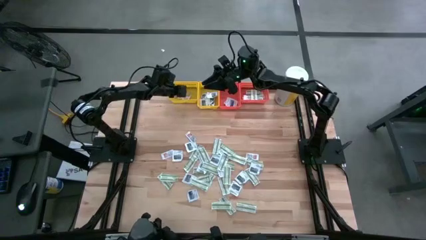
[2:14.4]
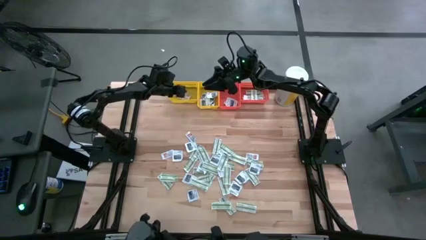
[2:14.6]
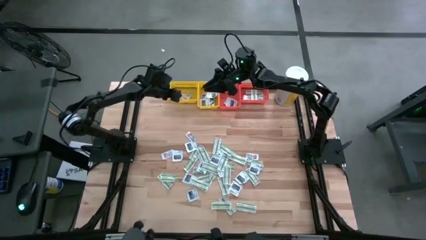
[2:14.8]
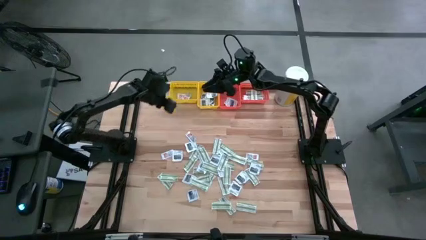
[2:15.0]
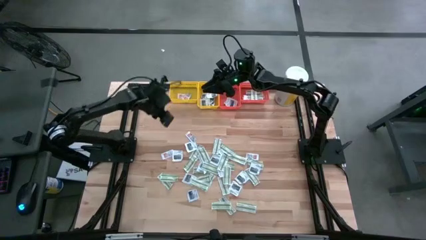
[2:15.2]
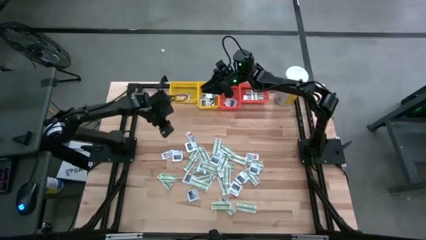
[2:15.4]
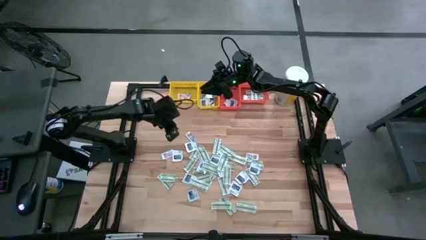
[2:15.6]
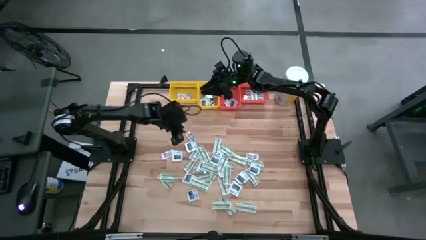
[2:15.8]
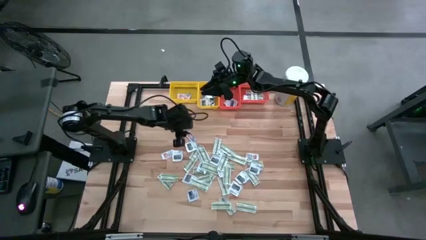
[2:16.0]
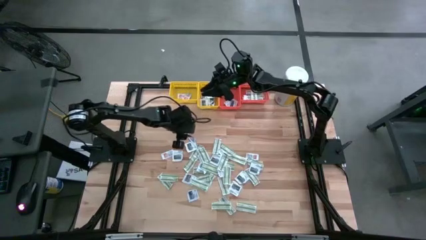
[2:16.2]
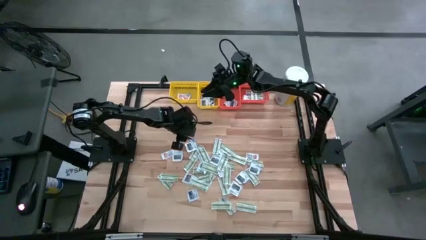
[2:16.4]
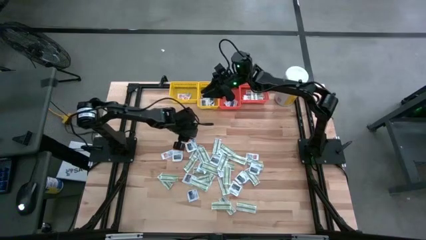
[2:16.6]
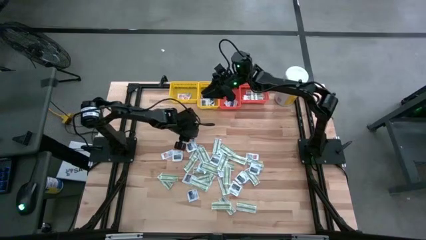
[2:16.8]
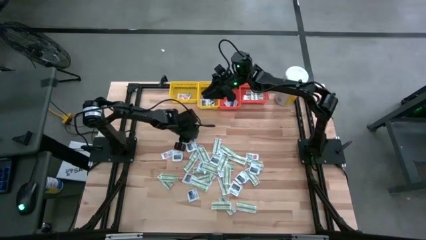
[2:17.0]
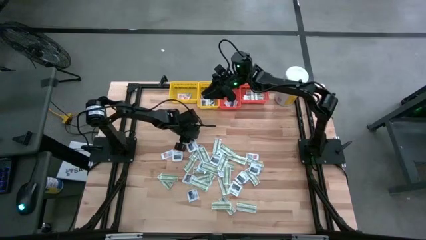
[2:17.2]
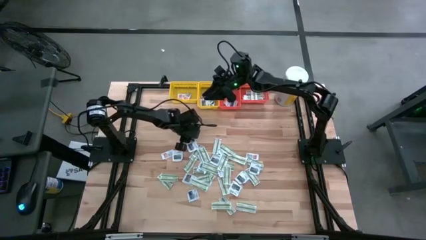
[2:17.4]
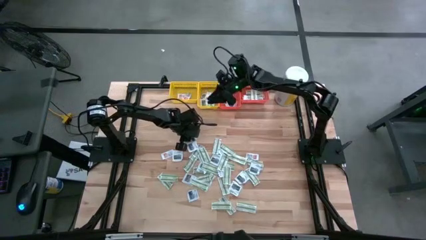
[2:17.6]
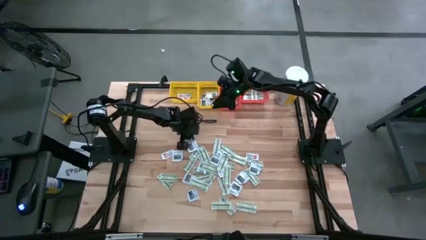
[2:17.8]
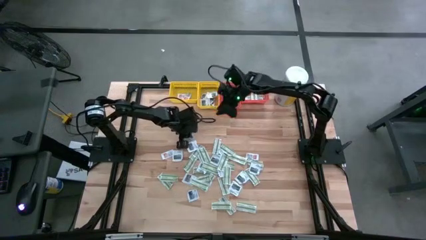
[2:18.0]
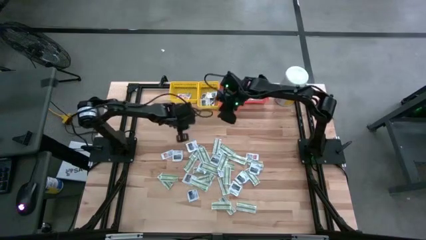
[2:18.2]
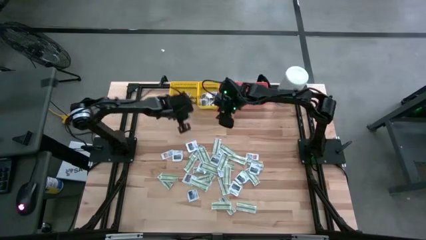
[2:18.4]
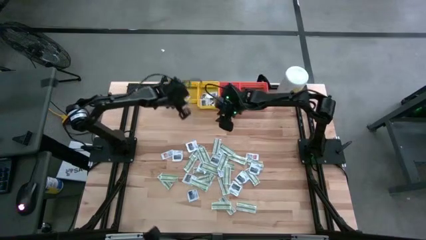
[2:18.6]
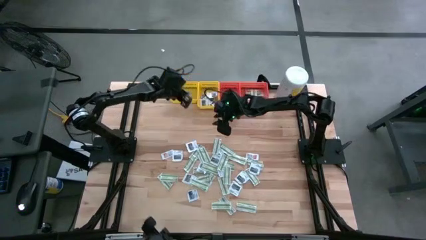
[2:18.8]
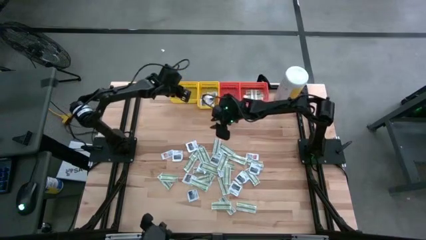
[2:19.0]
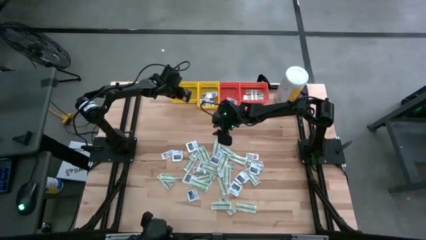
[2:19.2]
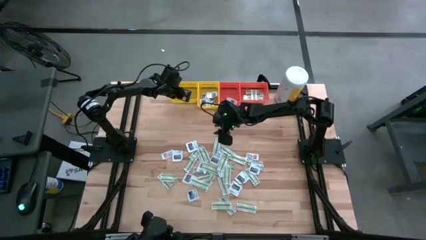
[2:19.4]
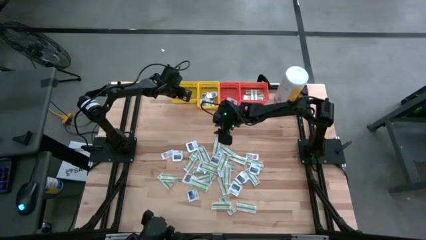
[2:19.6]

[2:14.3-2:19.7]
Task: Pick & Place First Aid Supplies
Put the orange packet into the left yellow bin

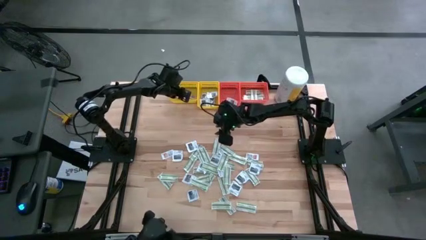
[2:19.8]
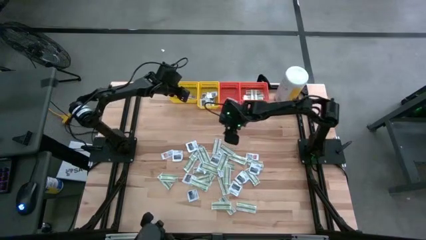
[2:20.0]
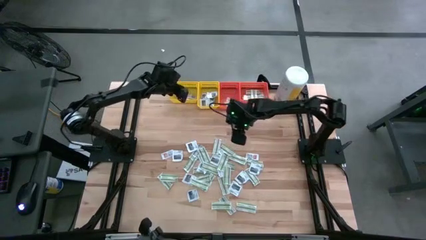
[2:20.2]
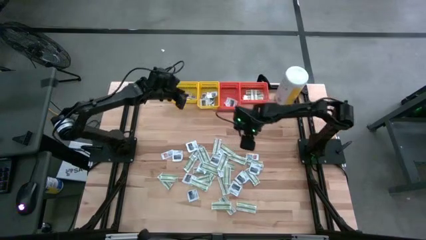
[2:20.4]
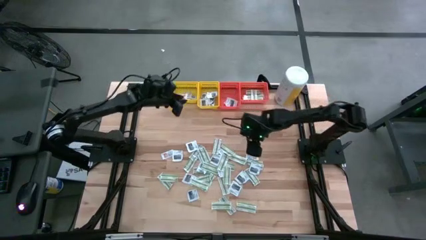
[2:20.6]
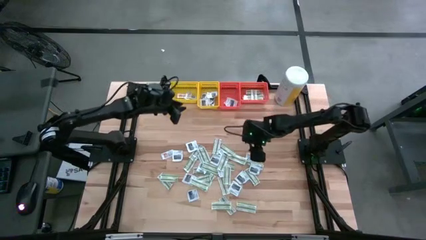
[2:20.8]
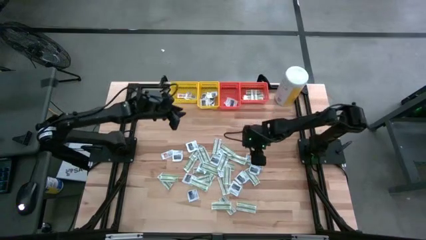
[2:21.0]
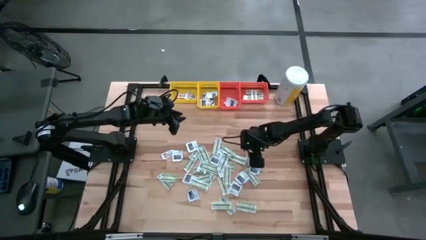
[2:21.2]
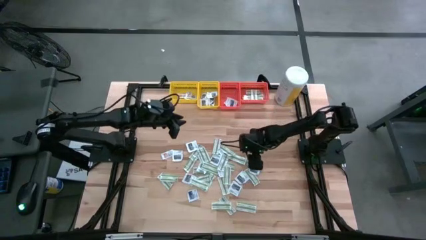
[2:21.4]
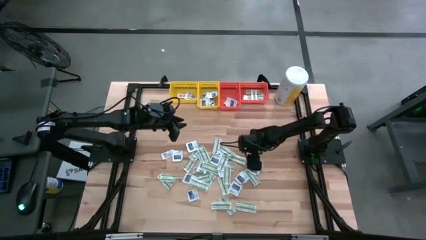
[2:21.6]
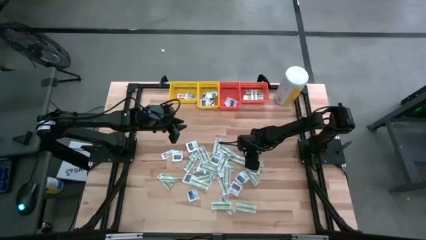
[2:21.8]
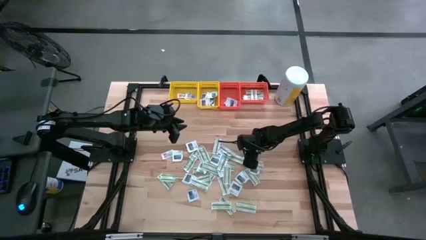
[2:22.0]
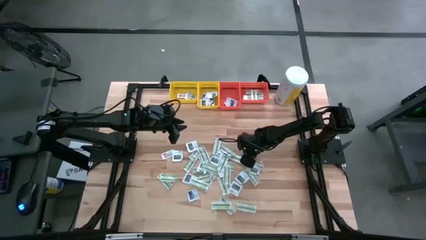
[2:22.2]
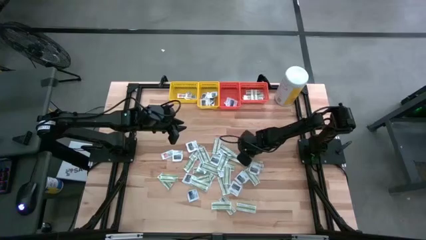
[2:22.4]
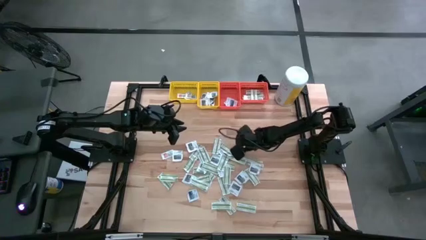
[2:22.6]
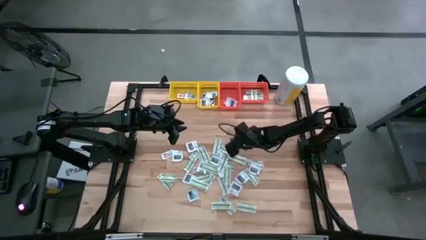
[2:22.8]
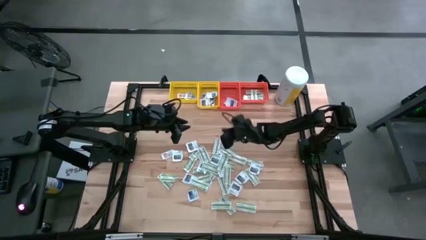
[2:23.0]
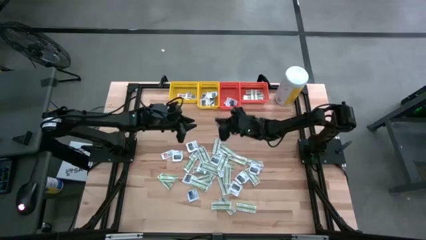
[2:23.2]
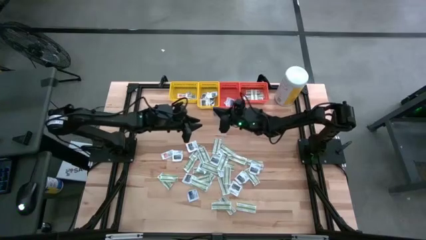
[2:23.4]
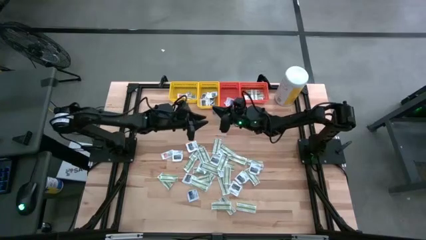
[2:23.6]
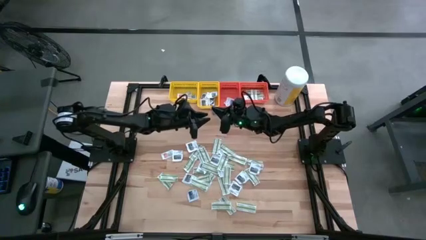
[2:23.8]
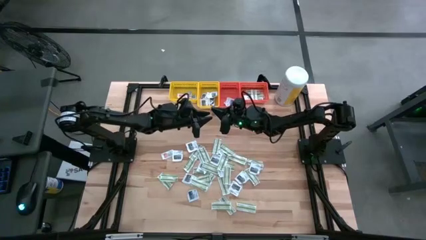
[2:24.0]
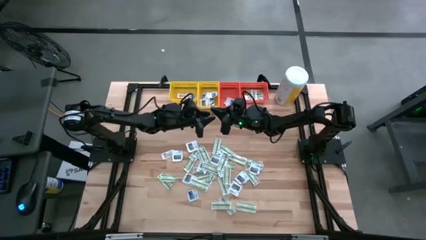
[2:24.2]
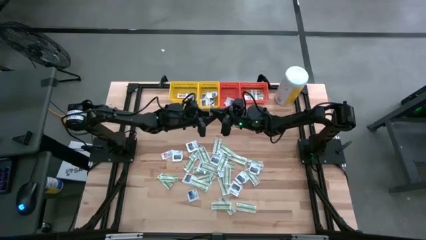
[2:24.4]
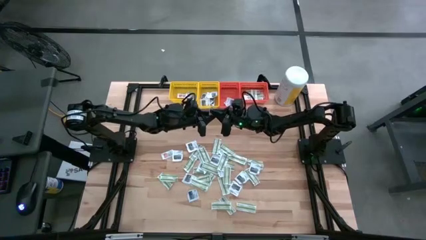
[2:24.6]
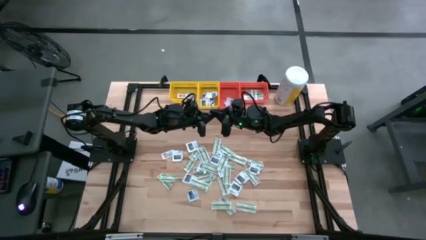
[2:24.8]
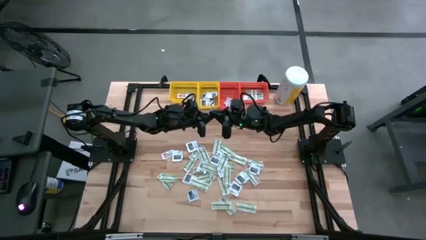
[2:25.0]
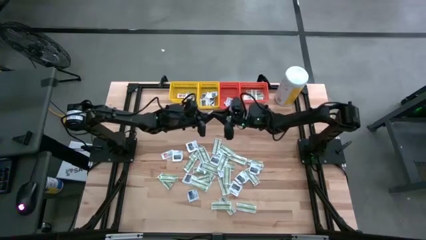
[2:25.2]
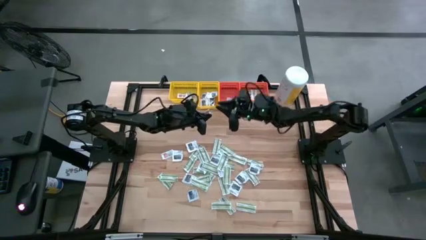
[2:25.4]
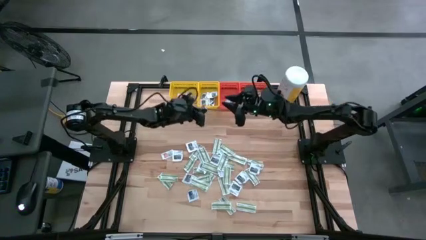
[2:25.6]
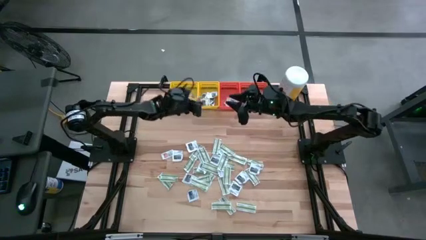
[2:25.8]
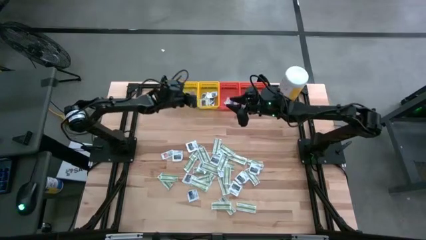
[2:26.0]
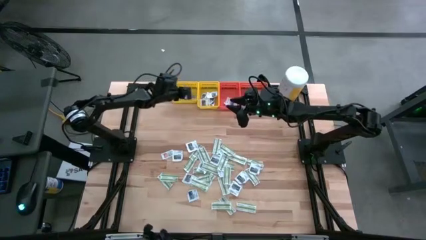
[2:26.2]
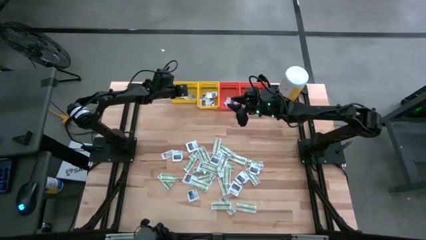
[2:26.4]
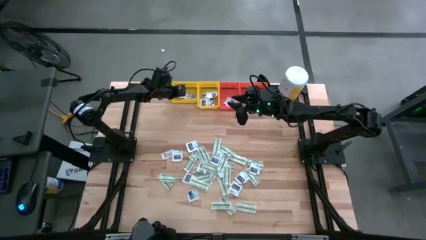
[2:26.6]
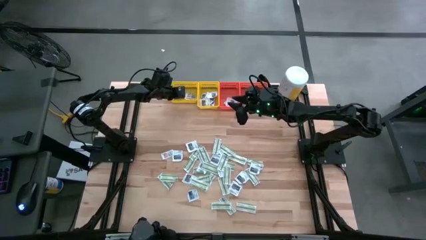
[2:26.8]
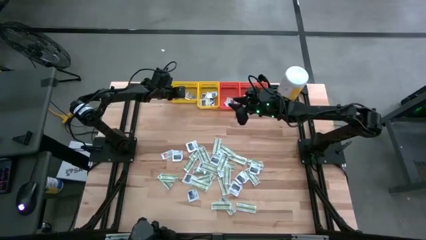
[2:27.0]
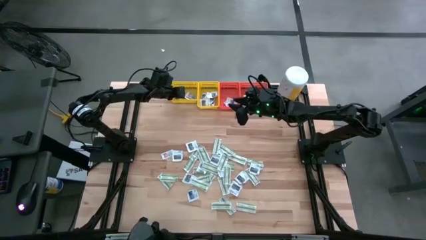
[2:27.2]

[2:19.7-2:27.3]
Put the orange packet into the left yellow bin

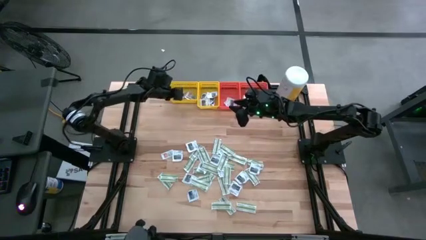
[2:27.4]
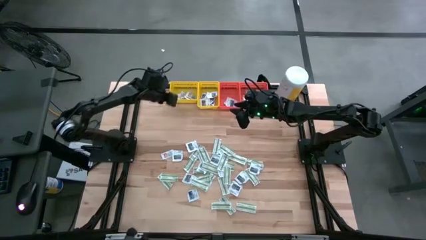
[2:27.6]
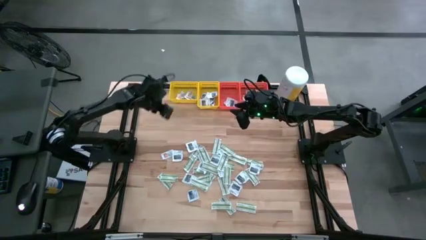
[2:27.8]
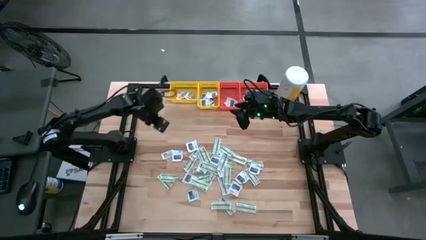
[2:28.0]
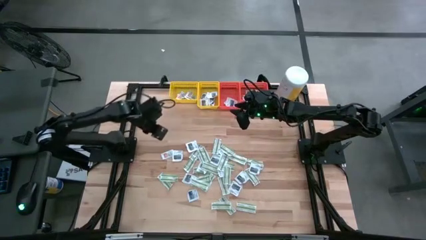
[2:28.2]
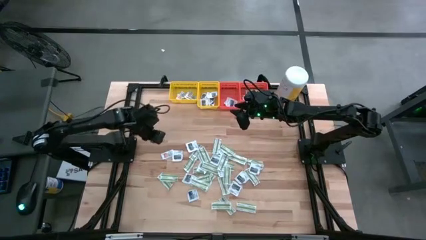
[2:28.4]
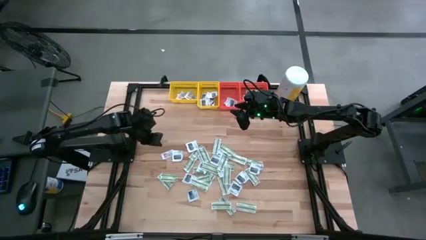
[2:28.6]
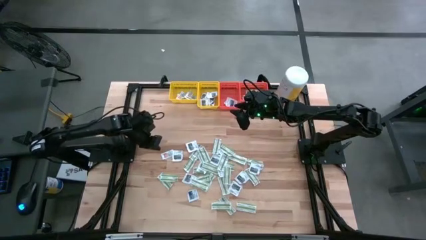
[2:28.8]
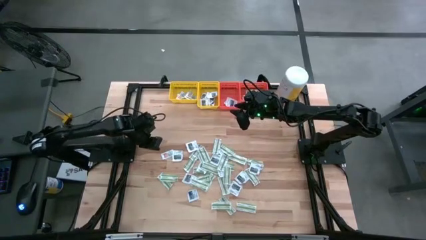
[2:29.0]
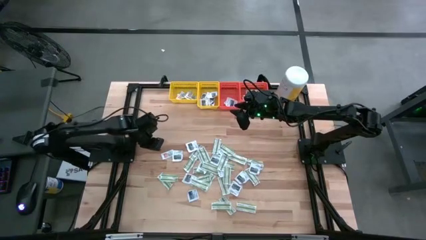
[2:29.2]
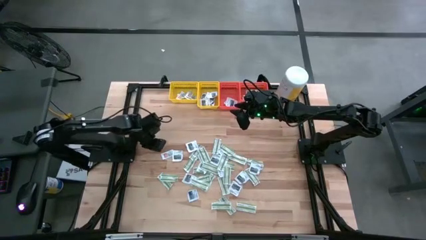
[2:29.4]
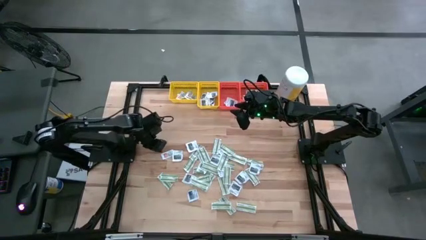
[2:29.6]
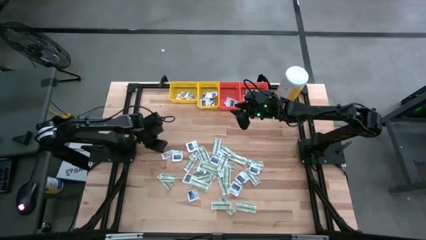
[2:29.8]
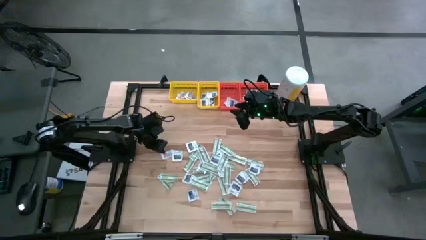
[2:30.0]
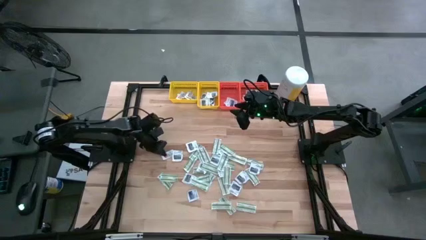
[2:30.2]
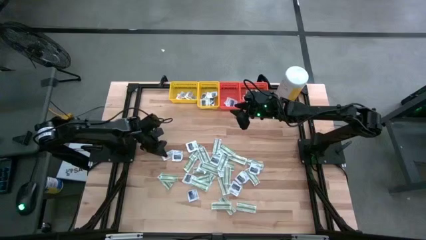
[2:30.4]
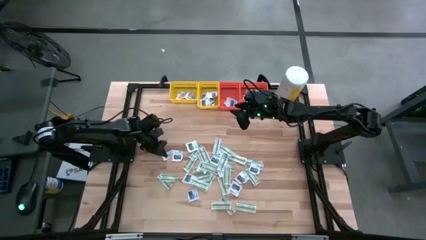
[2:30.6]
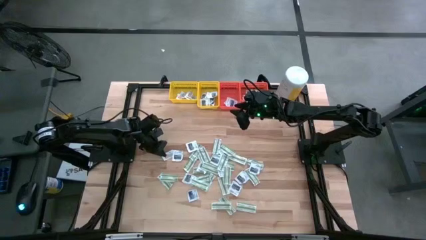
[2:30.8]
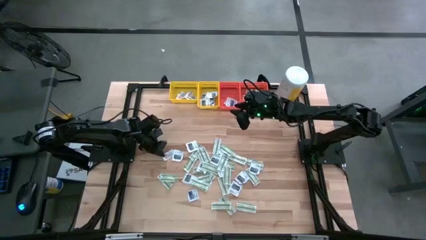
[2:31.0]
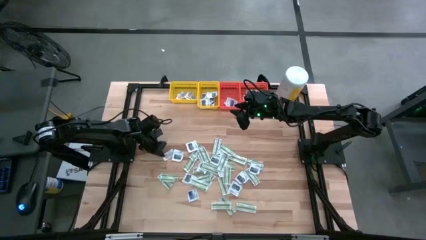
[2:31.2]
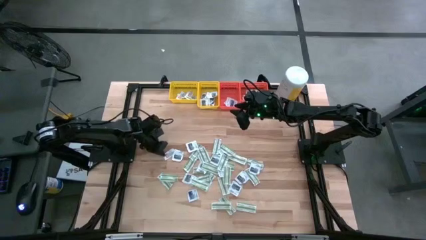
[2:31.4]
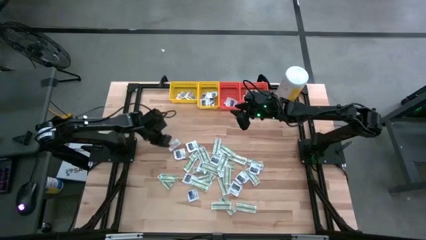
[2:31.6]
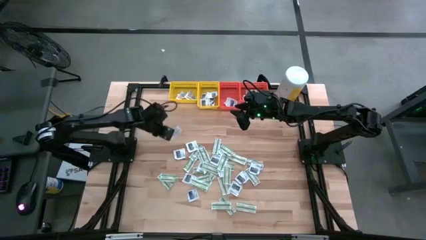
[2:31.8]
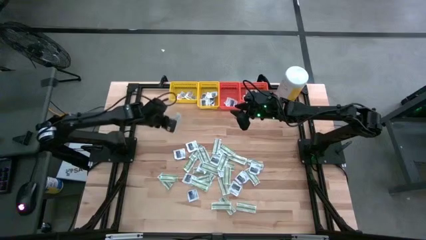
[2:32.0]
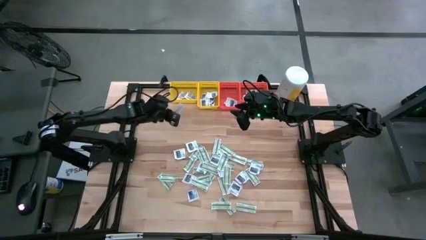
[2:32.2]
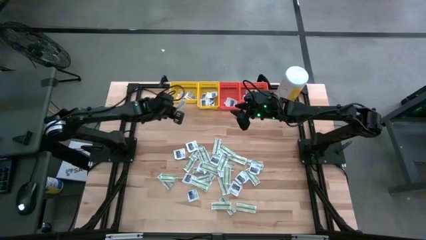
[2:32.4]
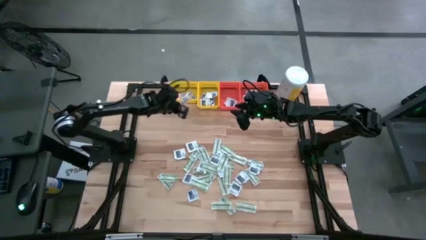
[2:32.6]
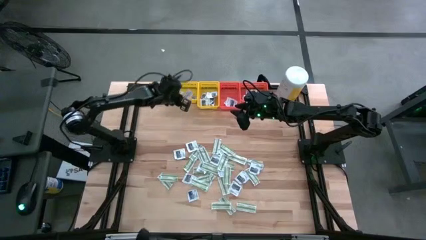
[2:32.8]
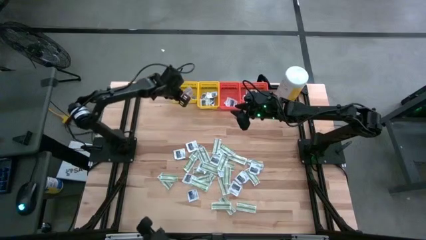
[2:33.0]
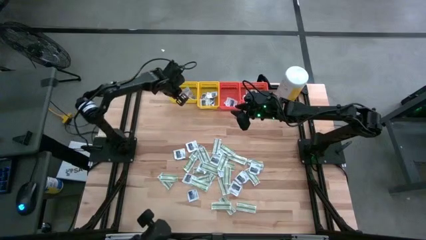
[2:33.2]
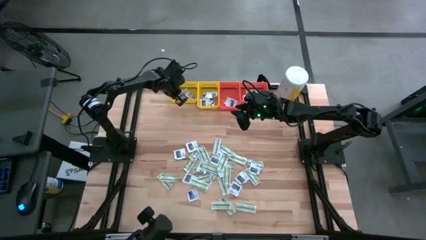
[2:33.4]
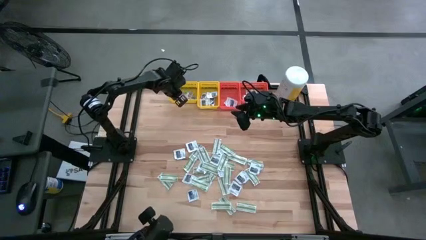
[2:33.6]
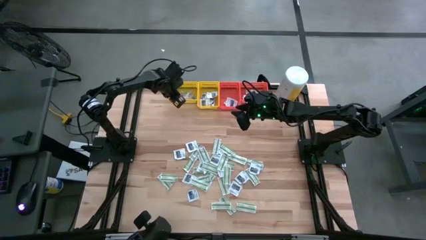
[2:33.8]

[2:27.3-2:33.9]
Put the orange packet into the left yellow bin
